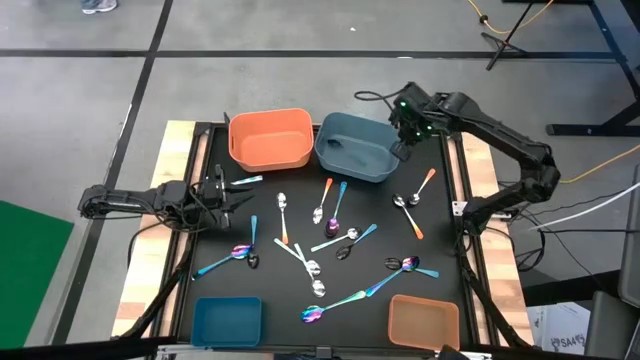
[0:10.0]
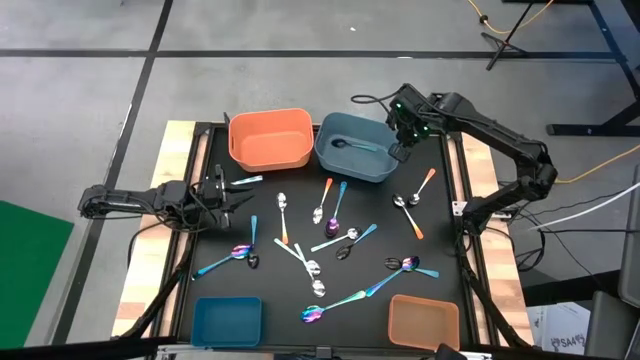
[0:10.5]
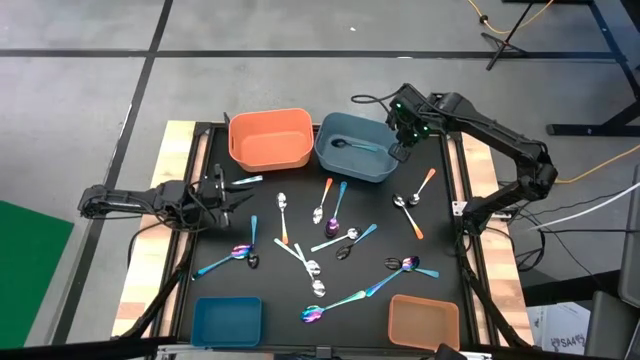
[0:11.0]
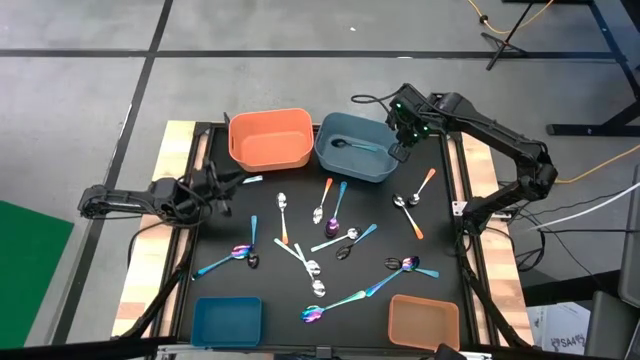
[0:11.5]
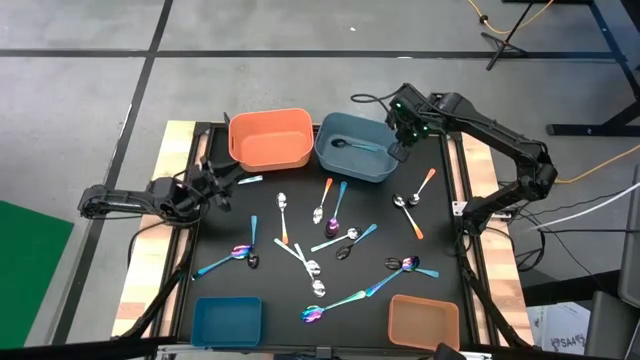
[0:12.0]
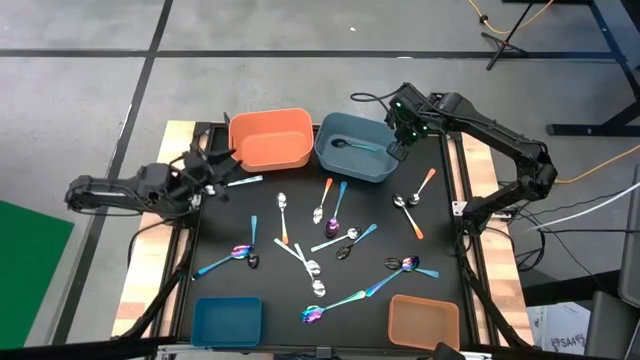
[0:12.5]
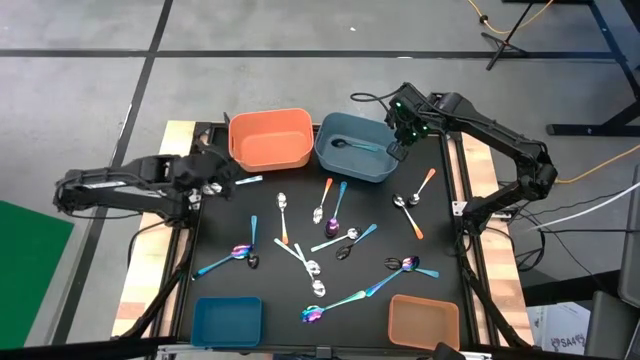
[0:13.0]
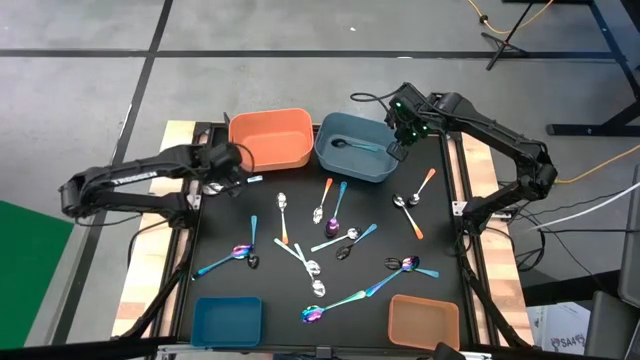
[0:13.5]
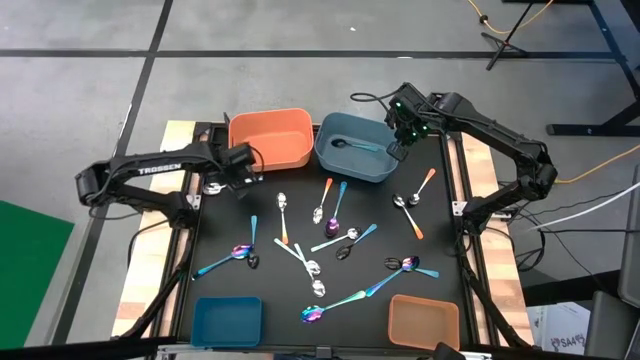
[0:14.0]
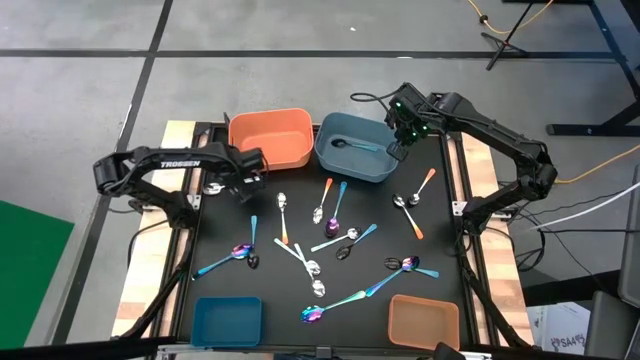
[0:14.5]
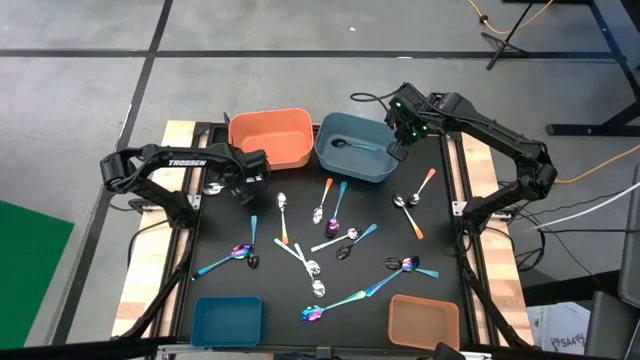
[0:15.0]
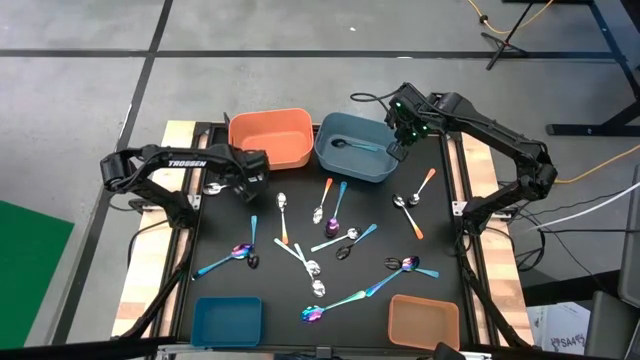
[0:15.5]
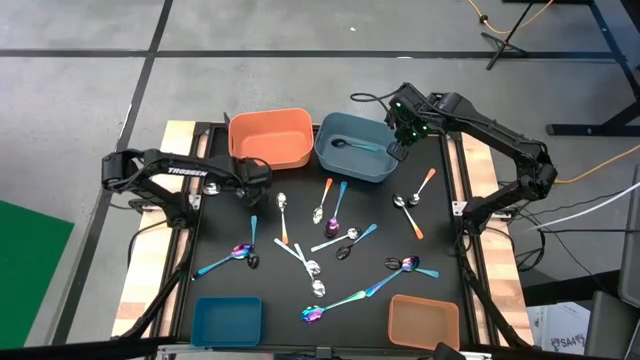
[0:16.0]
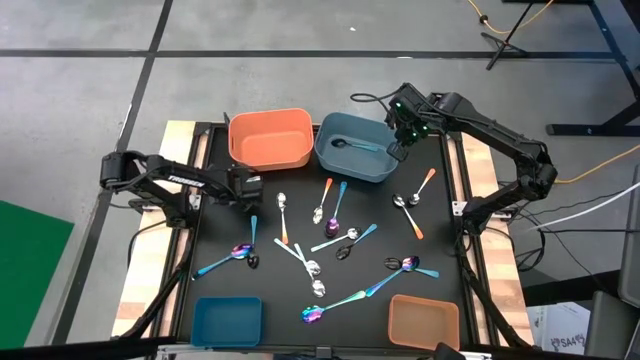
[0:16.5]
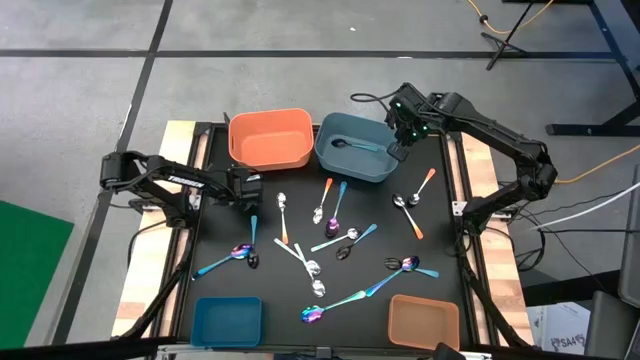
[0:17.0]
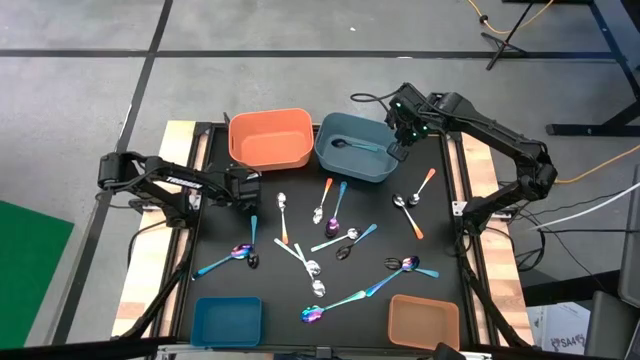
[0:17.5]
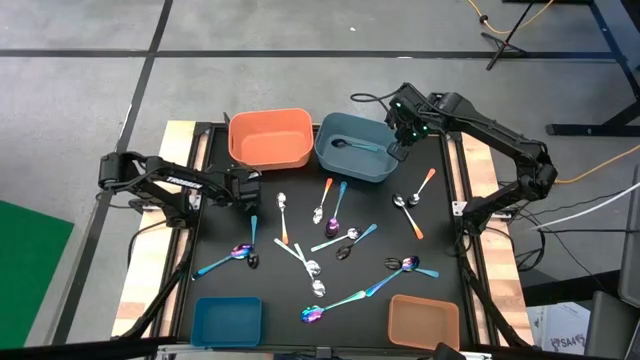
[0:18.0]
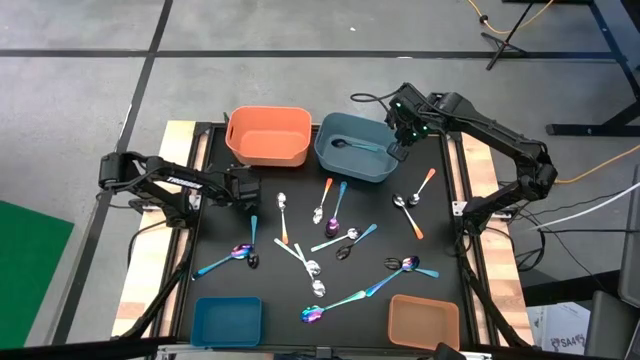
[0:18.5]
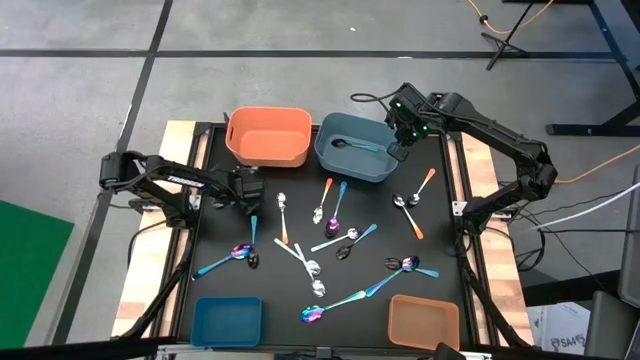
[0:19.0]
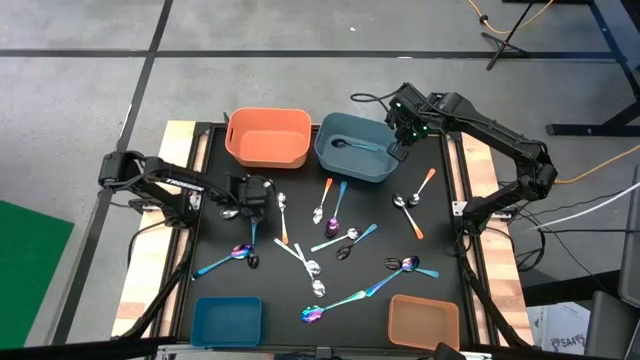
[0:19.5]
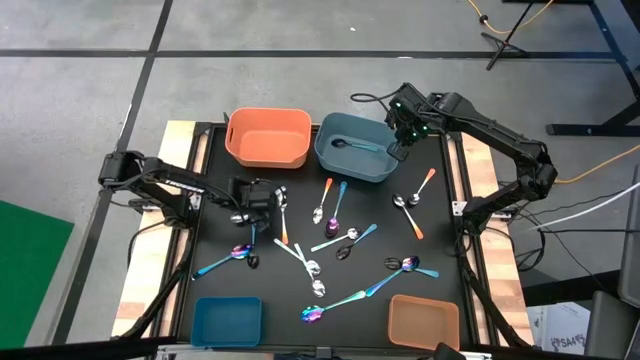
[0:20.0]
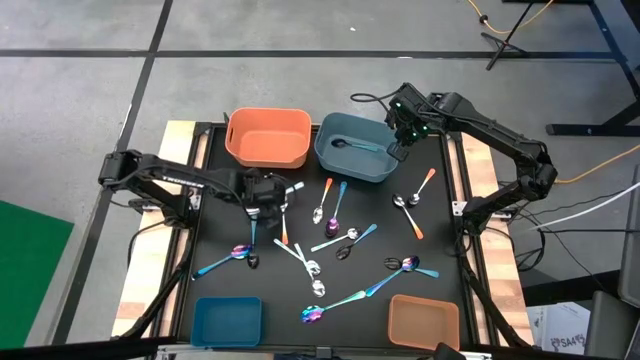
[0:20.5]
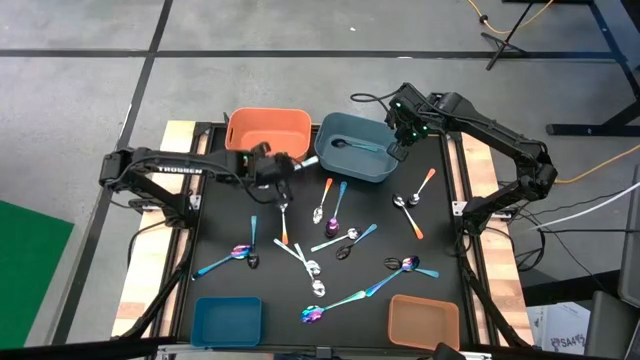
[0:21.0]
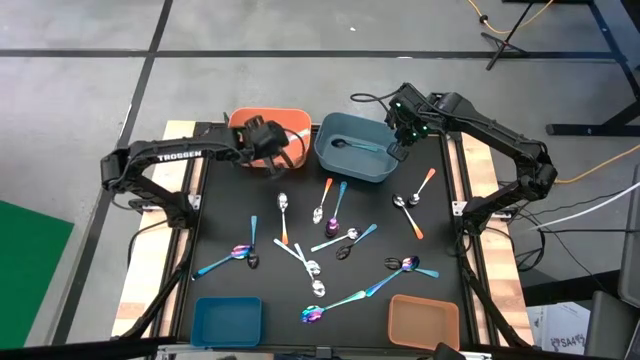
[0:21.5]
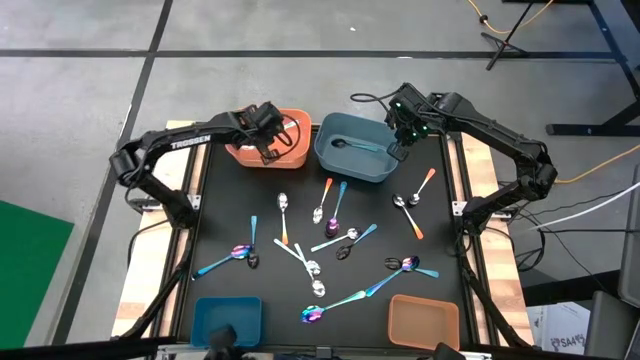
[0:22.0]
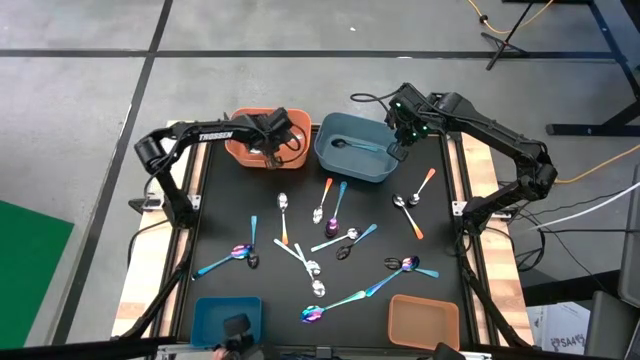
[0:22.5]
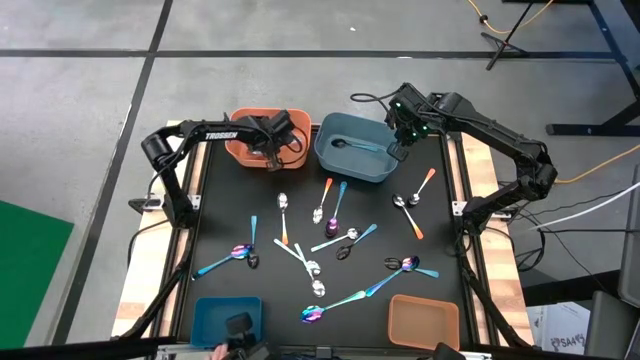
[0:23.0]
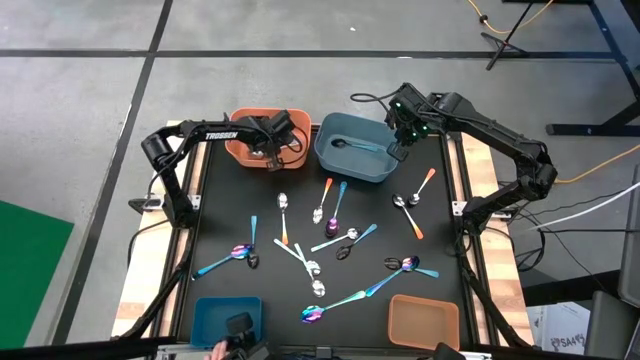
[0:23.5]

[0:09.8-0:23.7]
Task: Sort silverware by color (type)
Put the white patterned spoon into the top orange bin

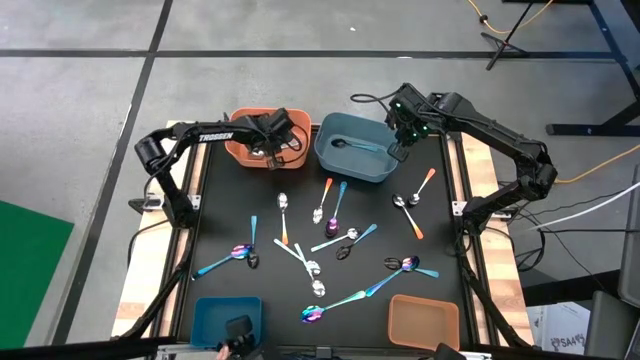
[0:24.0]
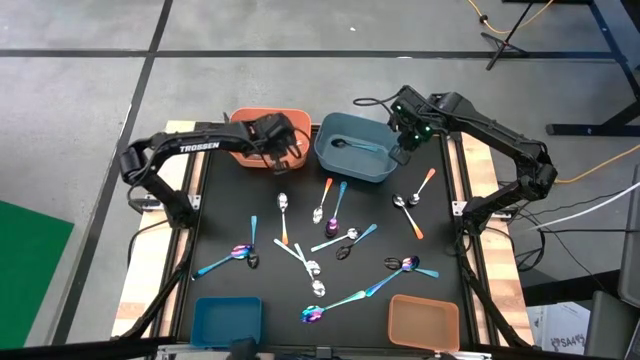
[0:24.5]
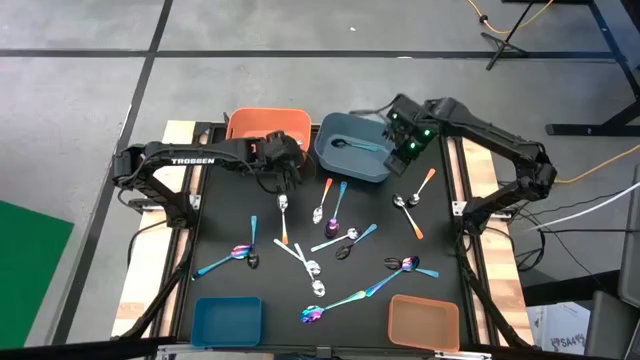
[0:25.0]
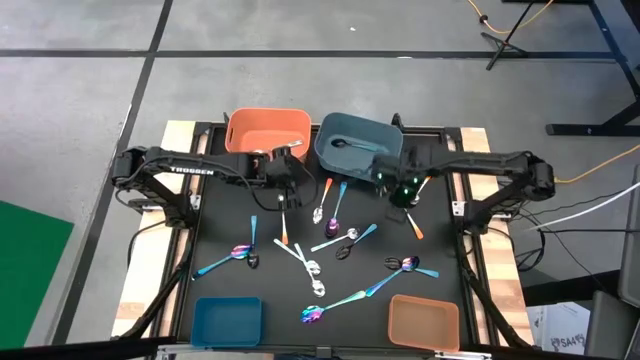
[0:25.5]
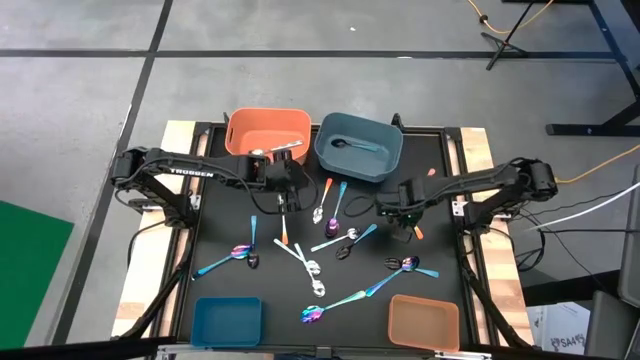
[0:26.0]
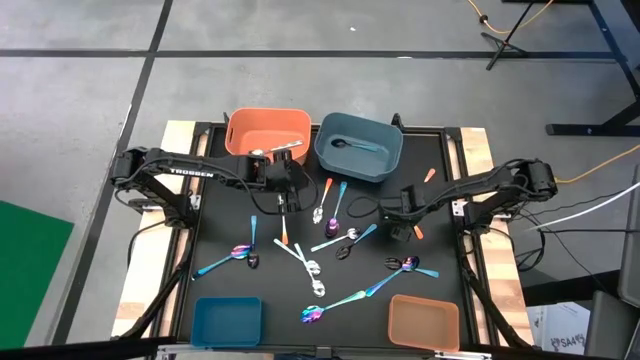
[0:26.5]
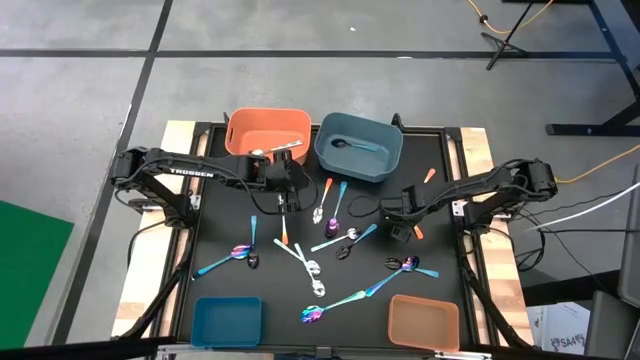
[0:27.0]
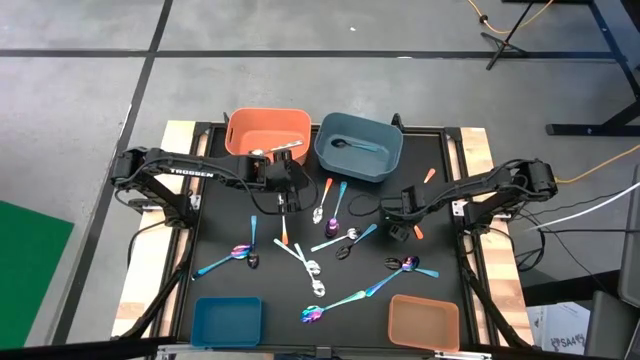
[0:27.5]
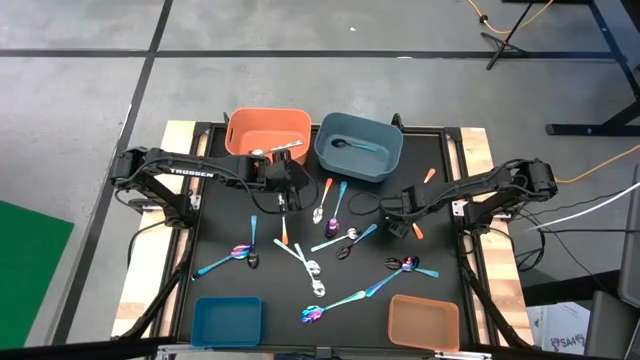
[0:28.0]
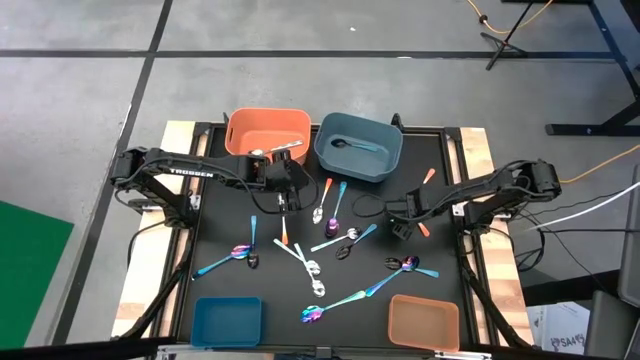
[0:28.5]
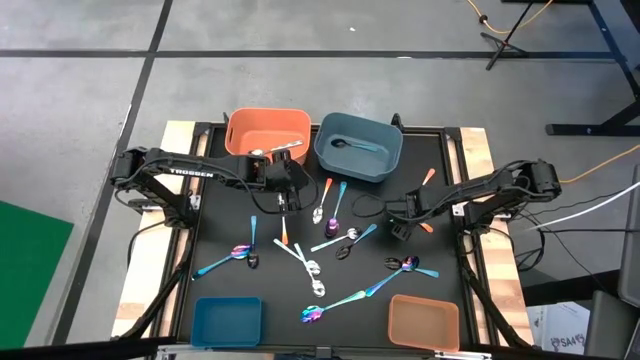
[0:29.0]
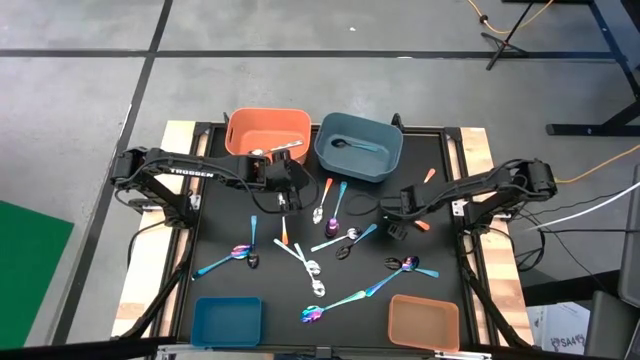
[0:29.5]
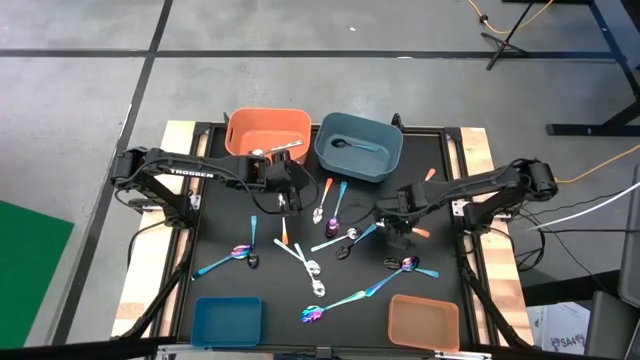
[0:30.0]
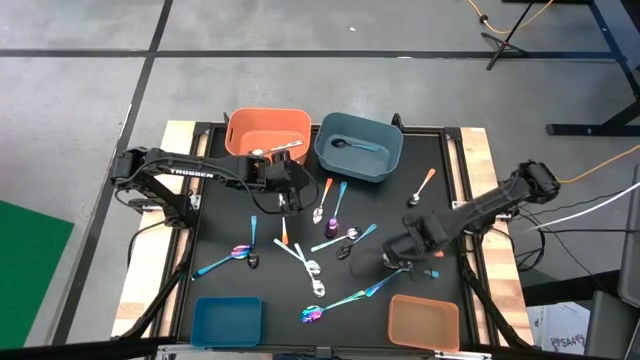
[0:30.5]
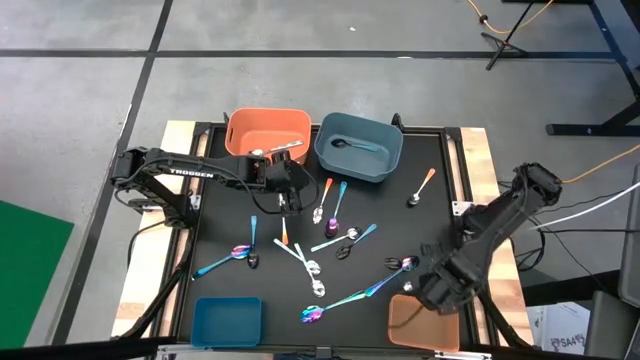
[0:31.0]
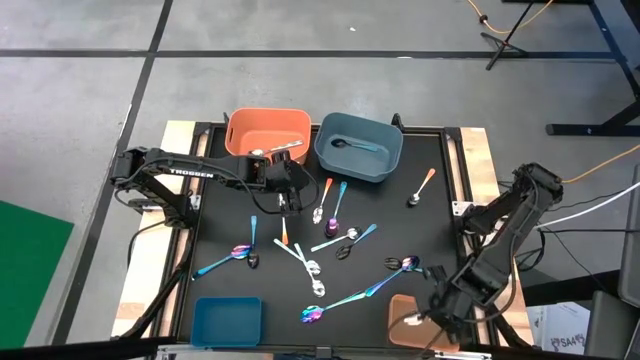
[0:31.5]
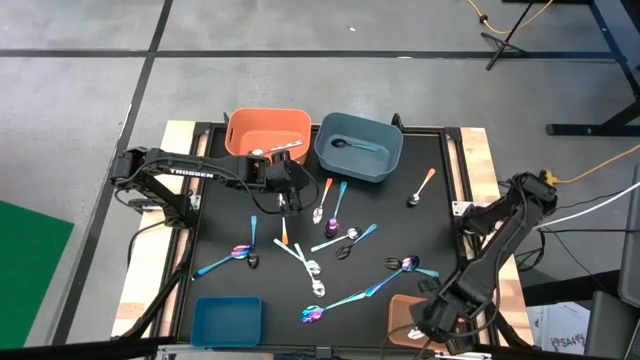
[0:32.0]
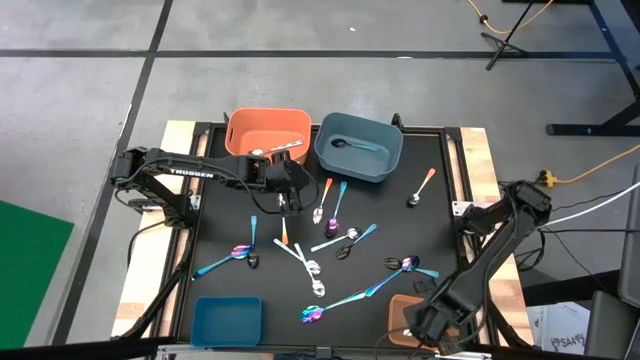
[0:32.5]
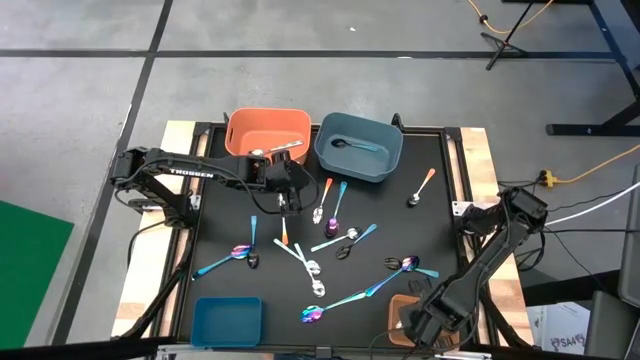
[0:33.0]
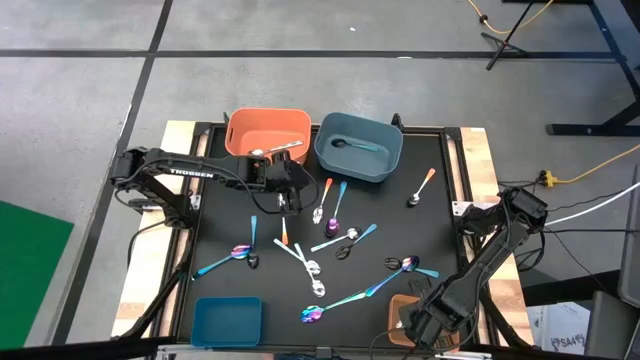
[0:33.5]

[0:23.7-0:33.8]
Put the orange spoon into the bottom orange bin
